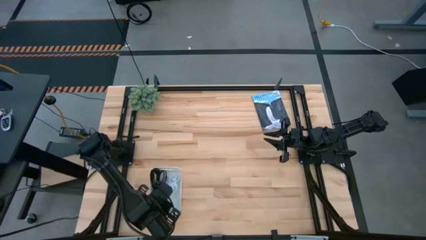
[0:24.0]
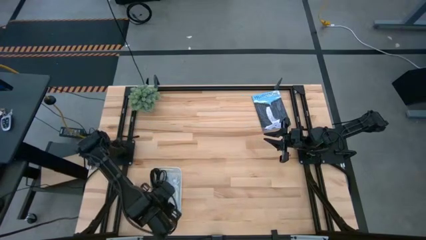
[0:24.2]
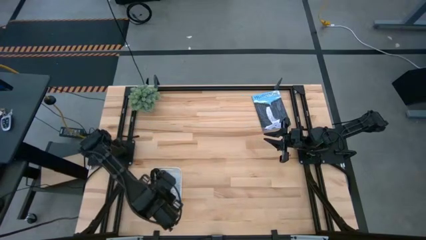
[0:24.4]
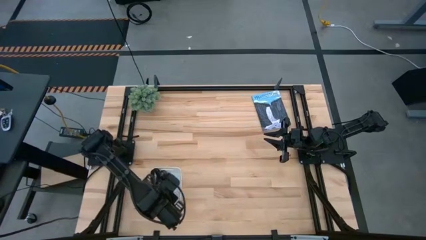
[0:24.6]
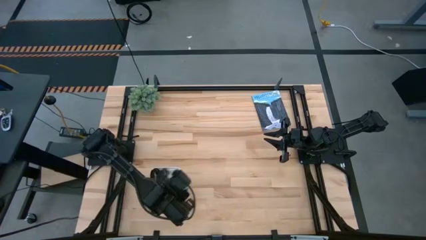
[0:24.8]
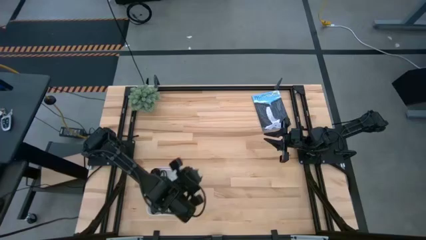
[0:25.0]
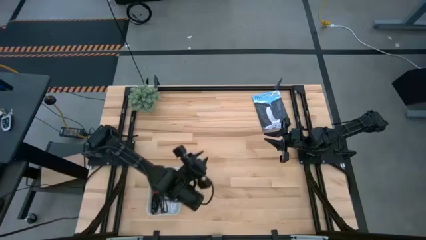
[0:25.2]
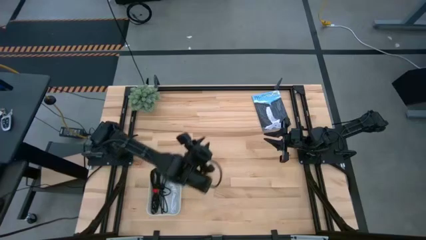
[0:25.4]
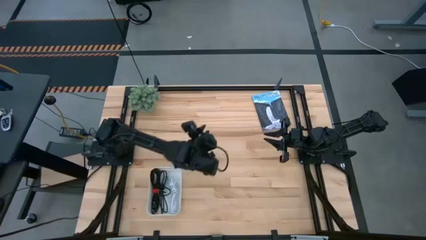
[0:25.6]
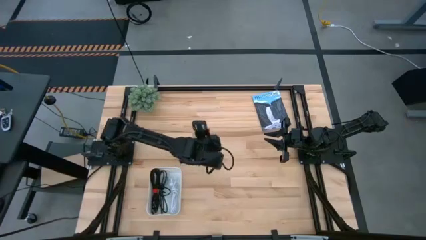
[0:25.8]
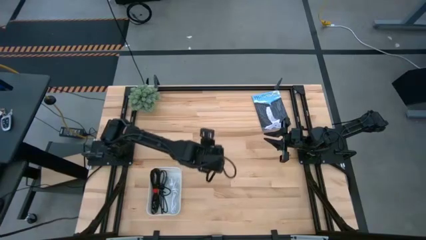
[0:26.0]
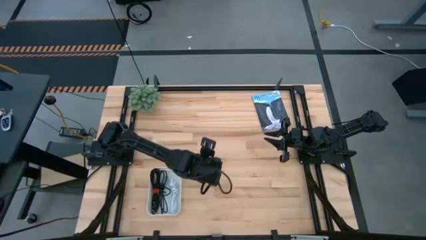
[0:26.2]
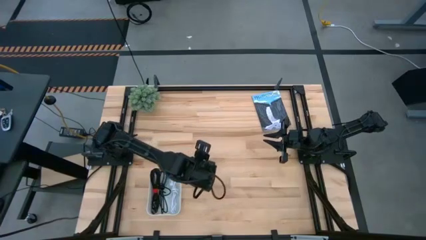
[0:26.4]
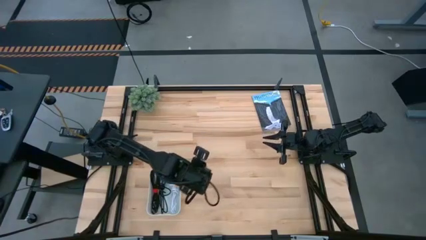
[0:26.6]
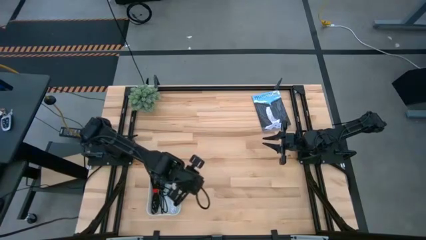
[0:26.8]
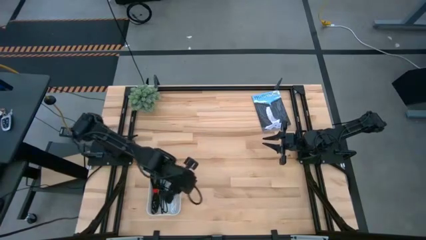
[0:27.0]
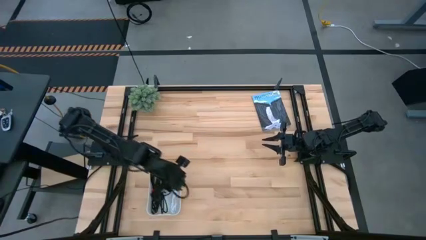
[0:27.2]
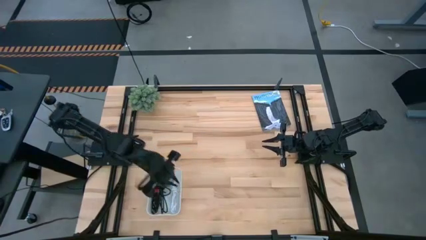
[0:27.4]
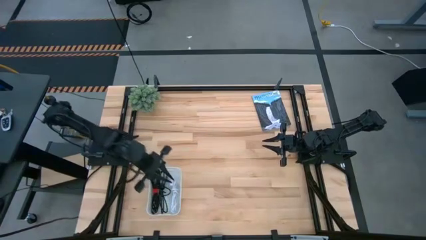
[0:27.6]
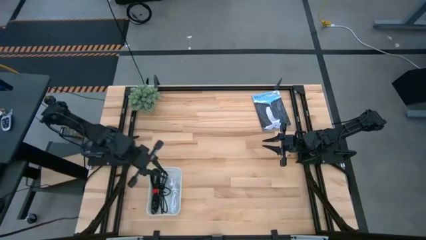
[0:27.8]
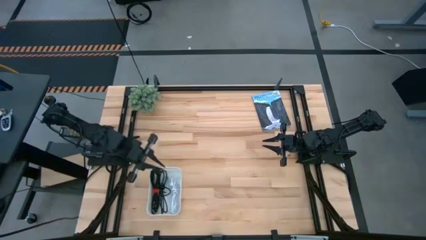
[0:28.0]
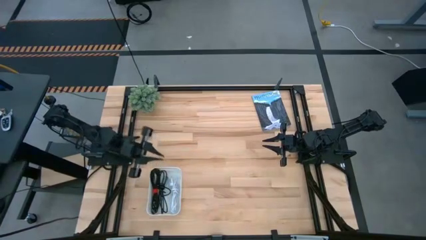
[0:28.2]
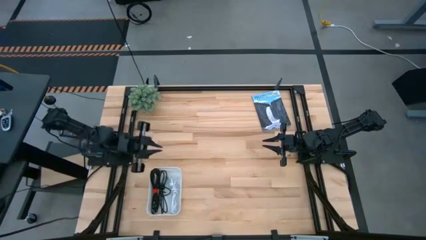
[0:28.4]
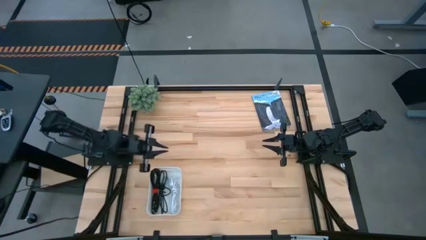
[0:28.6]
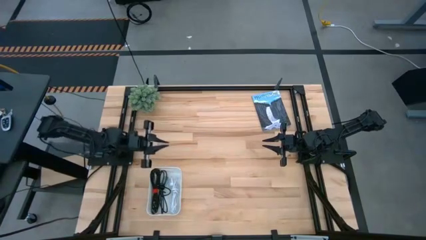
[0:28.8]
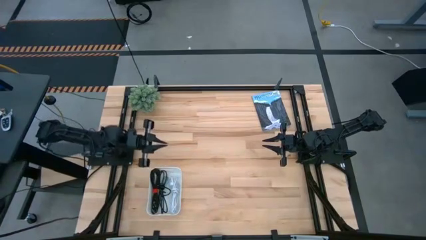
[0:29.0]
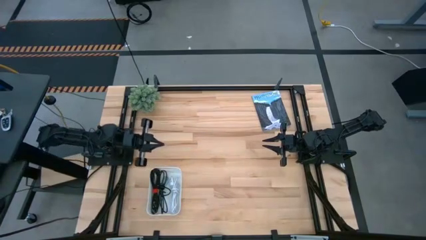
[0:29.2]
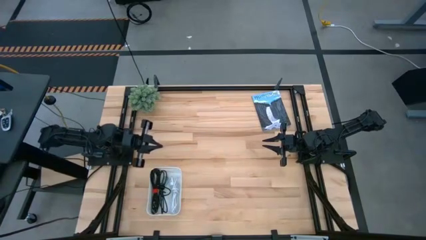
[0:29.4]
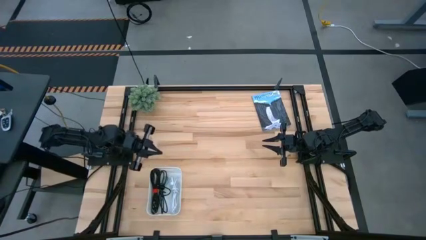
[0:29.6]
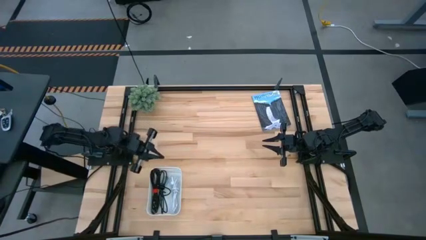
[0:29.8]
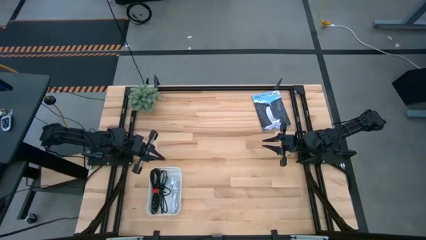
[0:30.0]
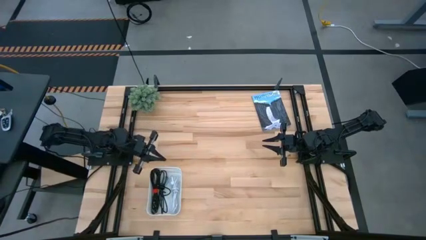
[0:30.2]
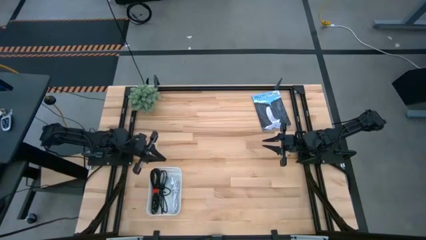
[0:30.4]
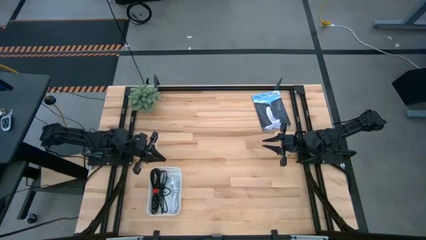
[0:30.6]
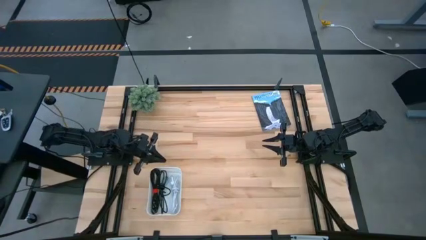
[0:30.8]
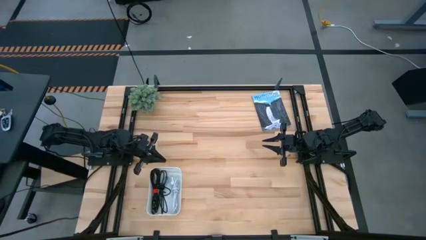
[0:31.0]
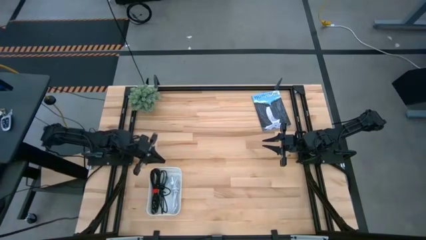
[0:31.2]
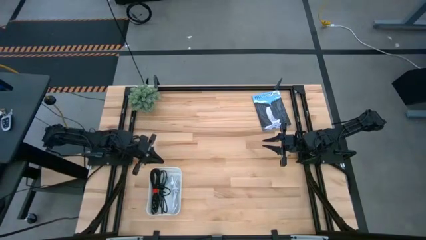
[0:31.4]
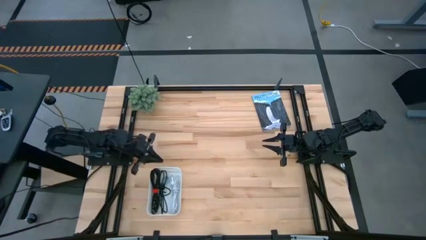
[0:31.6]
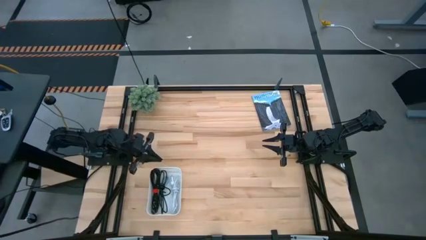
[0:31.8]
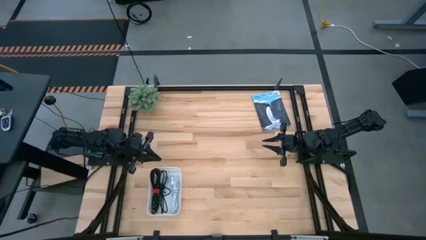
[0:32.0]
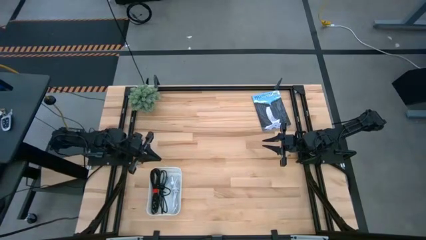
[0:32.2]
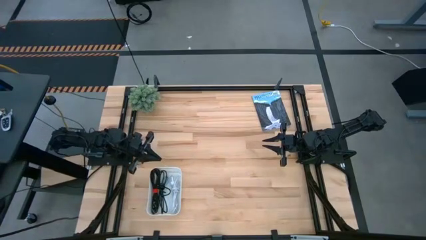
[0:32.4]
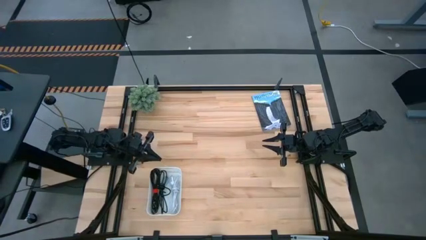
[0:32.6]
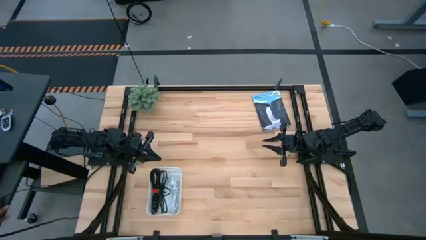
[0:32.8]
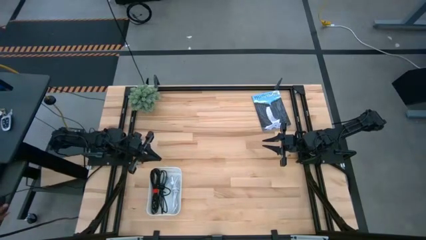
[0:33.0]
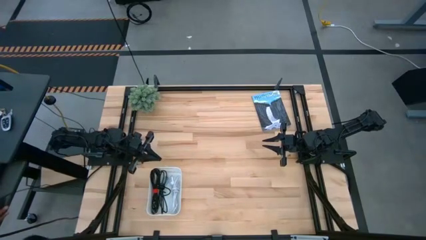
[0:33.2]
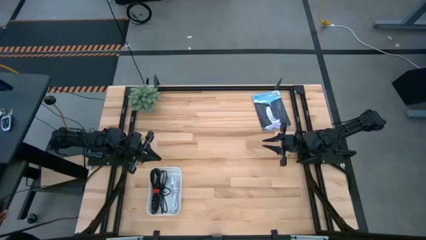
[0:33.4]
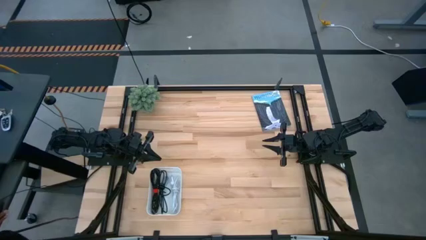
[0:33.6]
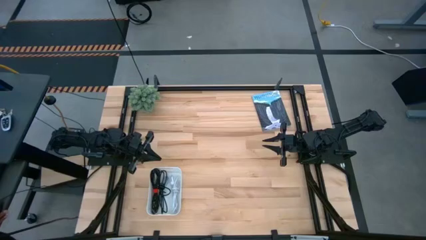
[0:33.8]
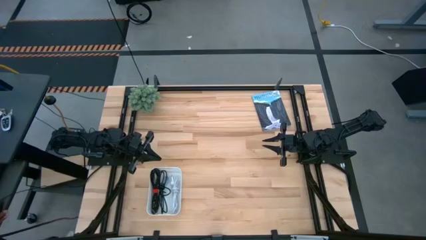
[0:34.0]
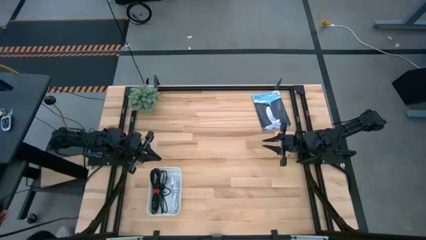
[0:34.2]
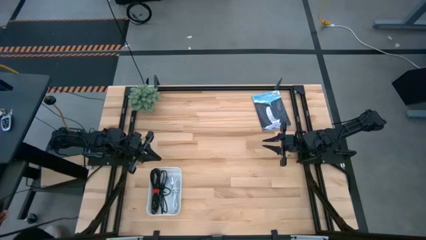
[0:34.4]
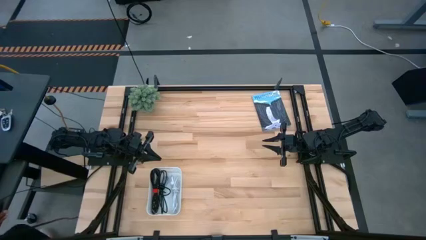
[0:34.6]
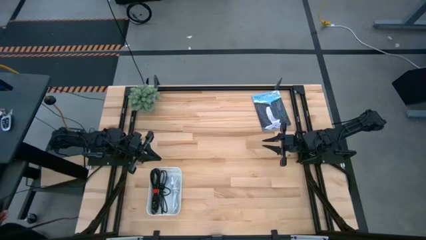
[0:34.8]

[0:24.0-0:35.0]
Task: Pick and place USB-C Cables
Return to Home Position

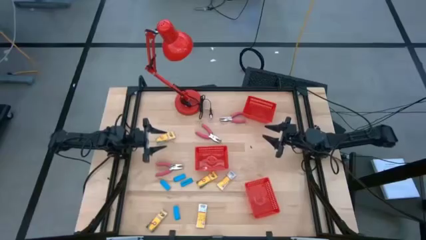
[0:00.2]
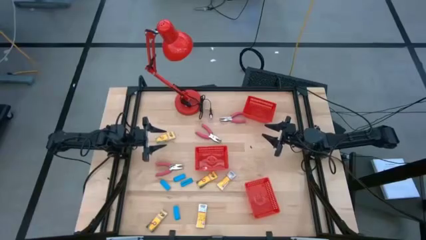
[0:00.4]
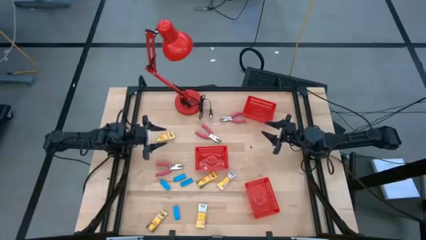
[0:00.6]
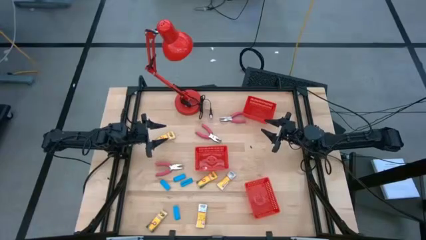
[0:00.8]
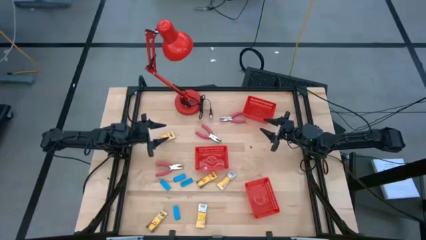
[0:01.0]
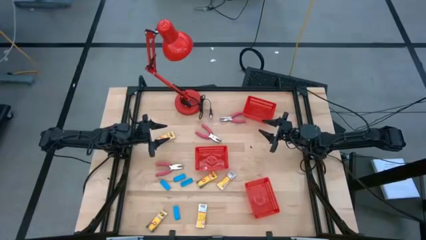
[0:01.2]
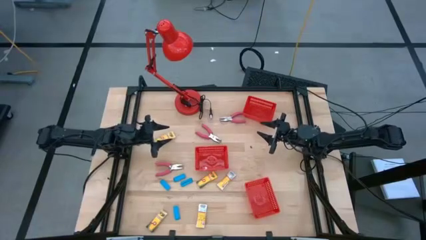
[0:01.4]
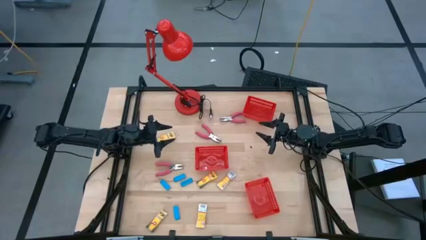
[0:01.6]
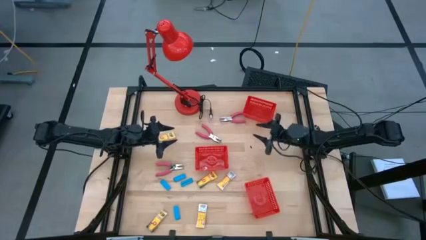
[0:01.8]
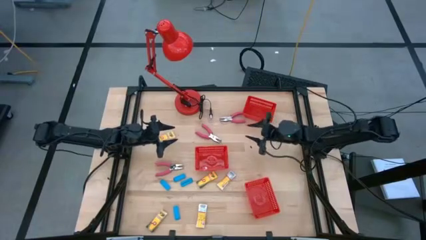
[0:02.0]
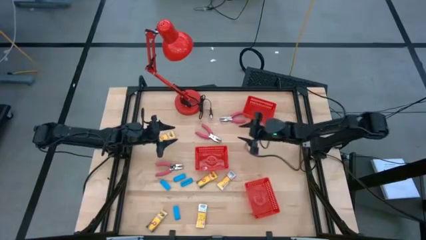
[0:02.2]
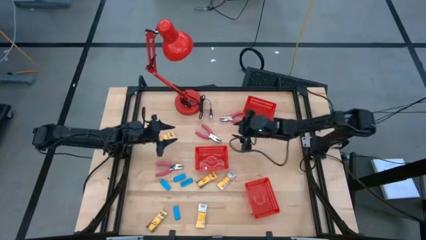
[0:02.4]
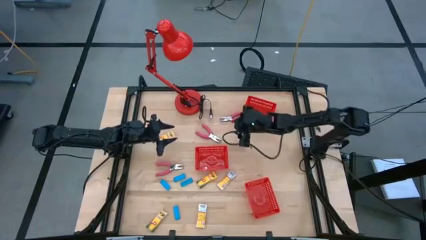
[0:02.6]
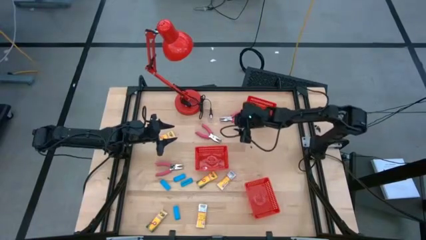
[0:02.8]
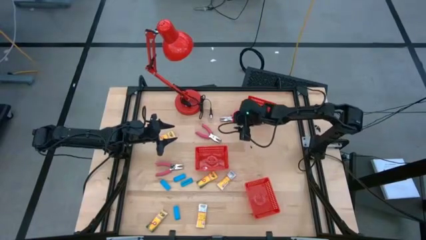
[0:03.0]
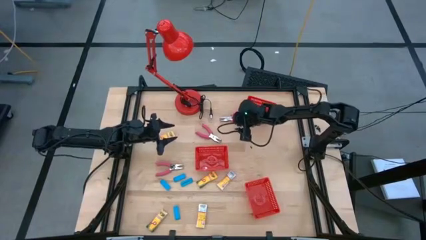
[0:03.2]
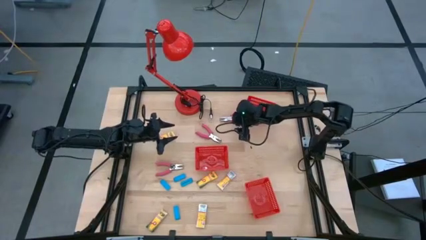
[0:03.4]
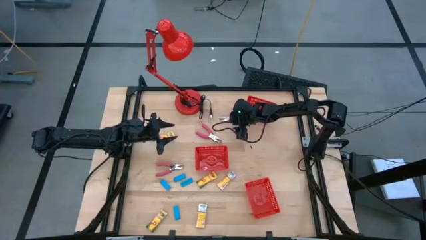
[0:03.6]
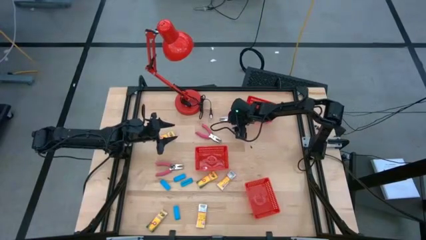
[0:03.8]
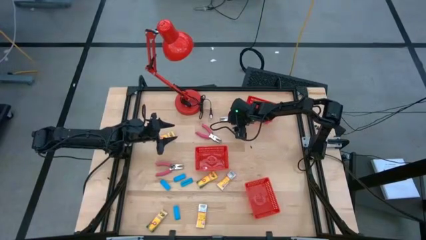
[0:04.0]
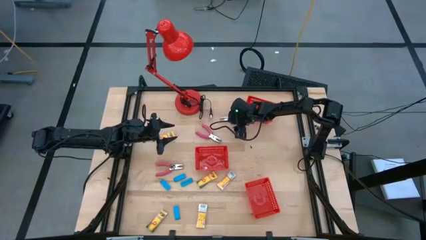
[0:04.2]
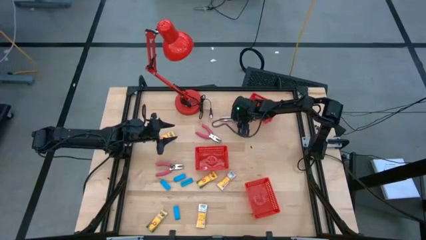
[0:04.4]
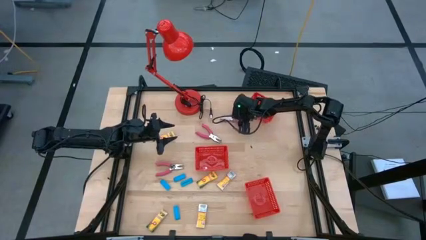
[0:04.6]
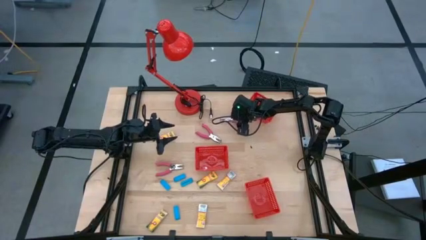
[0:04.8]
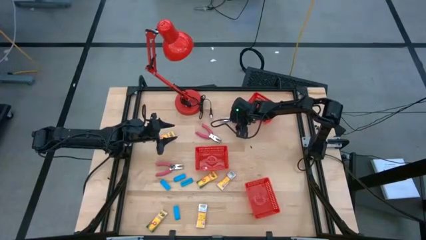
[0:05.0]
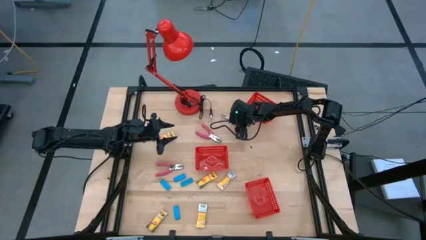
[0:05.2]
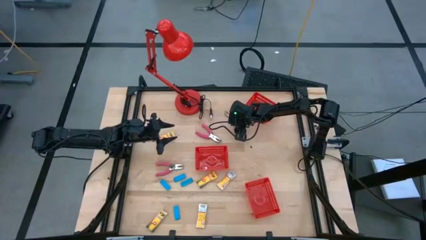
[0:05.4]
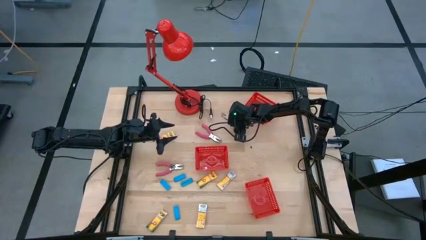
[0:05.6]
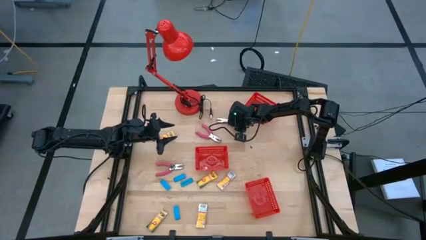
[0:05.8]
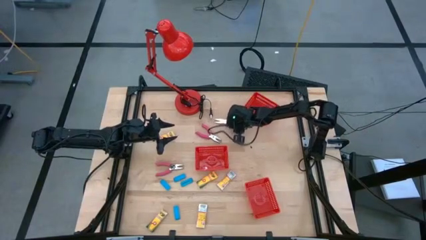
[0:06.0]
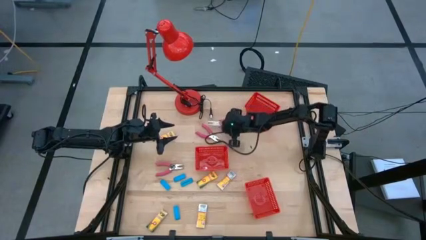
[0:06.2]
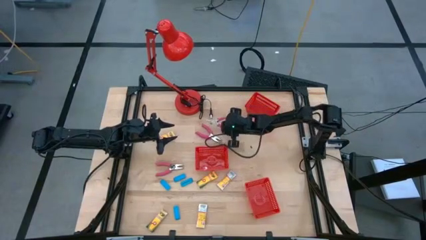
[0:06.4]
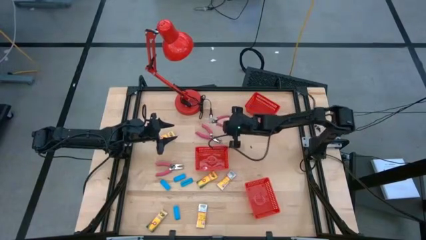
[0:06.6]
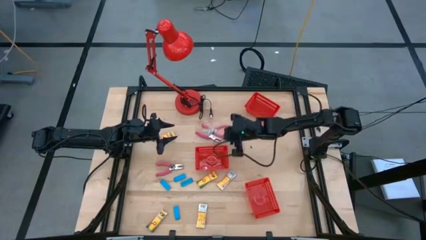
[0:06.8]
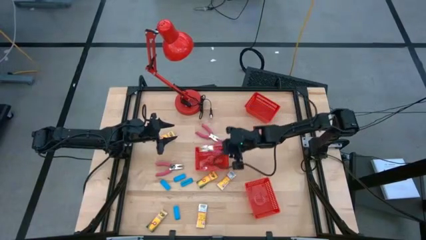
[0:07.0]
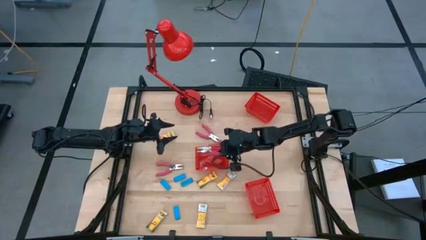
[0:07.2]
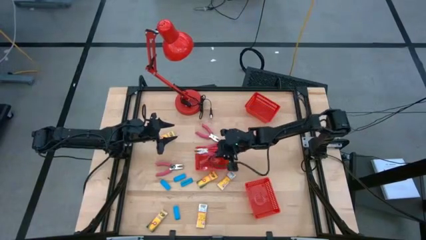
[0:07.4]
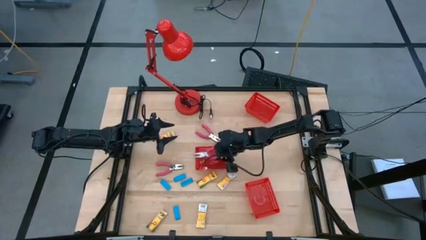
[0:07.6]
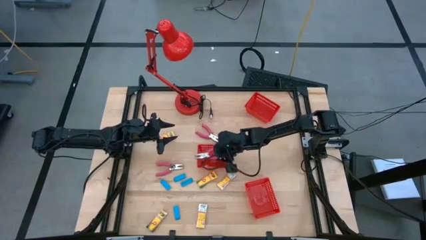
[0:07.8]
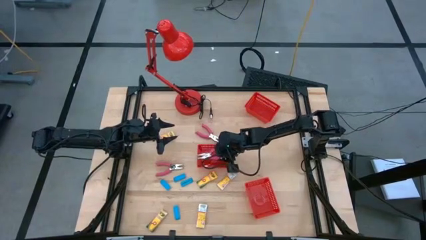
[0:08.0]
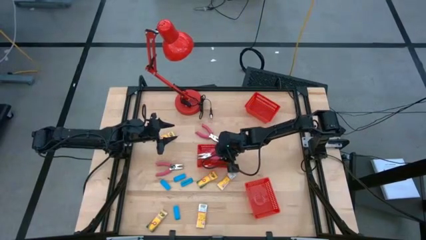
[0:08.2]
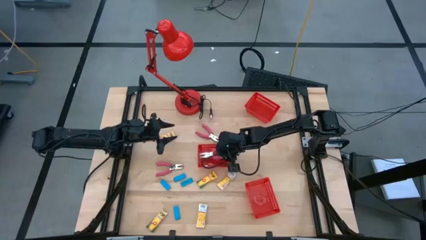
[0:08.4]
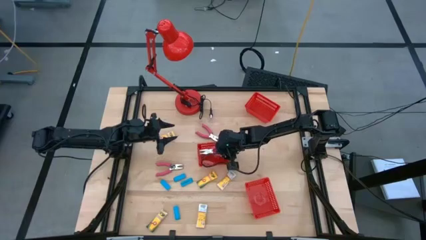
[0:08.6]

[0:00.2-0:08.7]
Task: Pick & Place School Supplies
Put the pink hole puncher into the middle red bin
